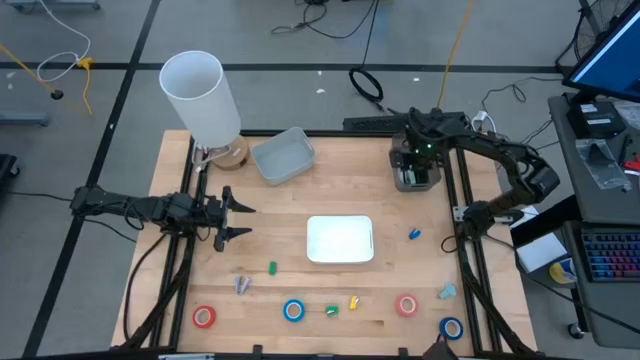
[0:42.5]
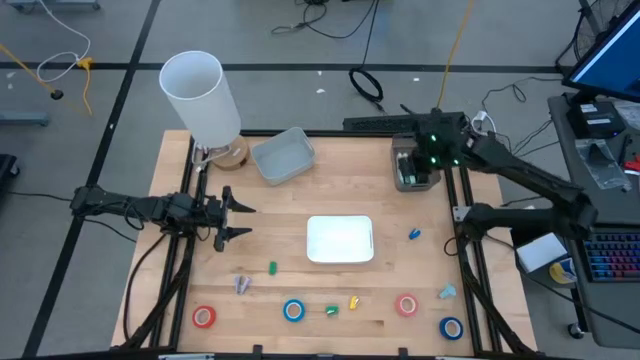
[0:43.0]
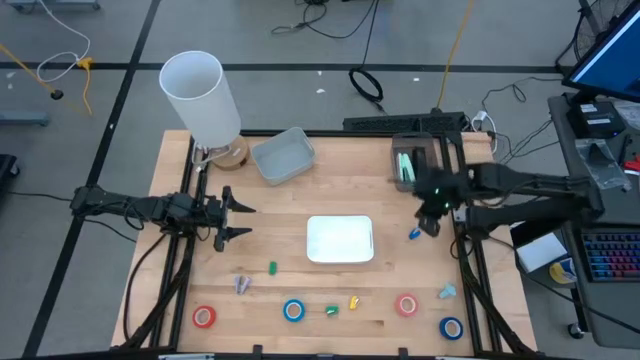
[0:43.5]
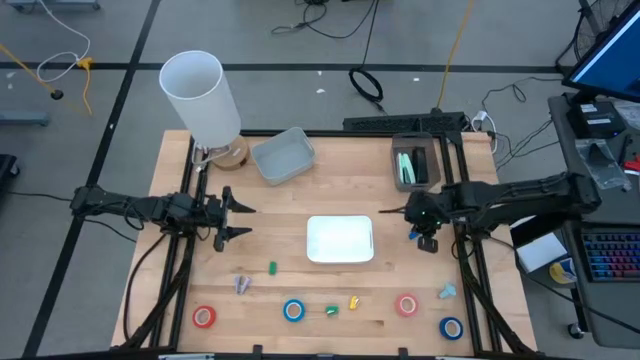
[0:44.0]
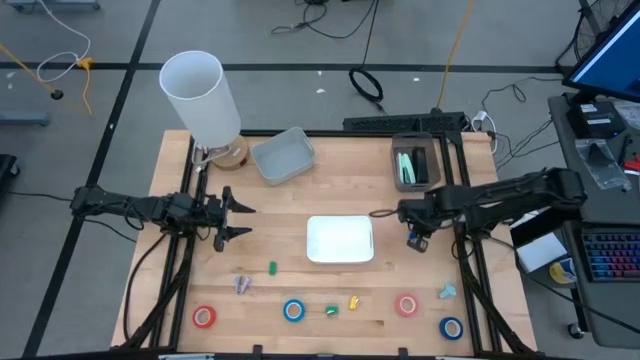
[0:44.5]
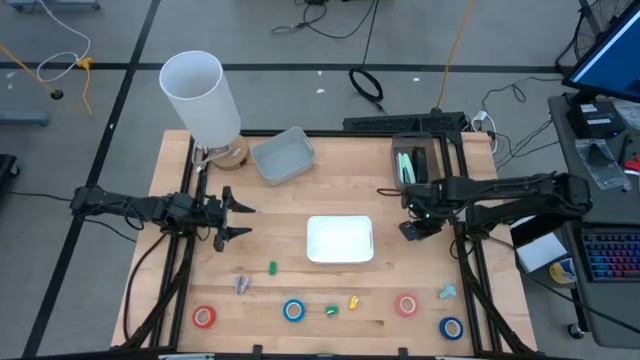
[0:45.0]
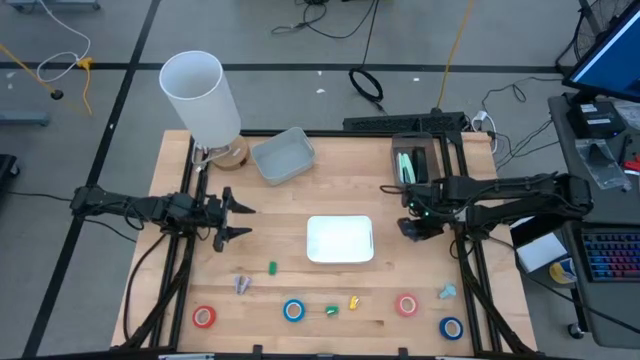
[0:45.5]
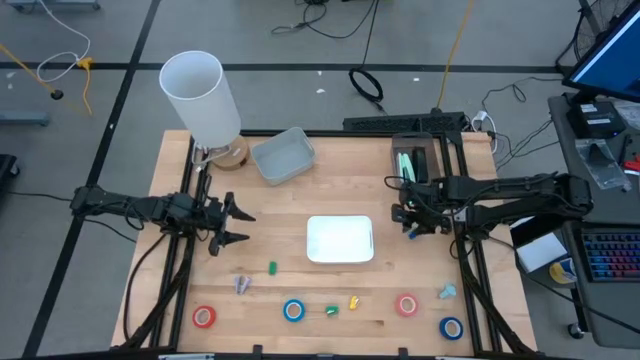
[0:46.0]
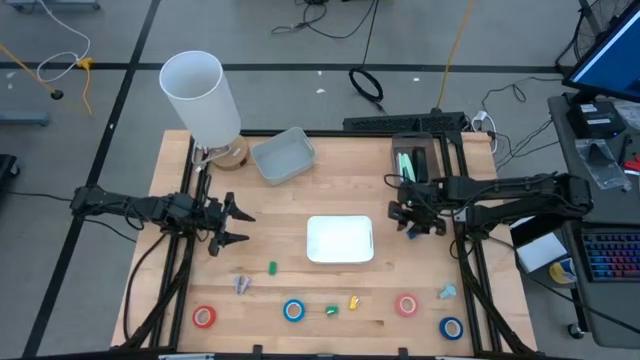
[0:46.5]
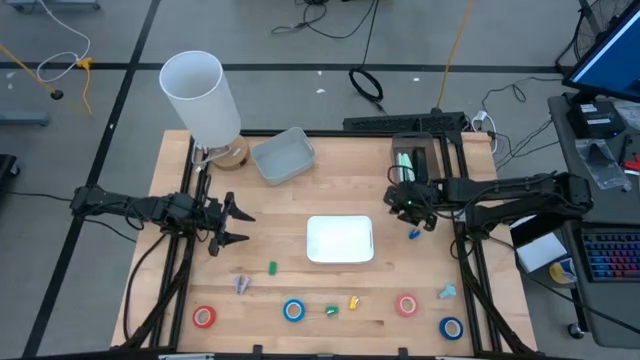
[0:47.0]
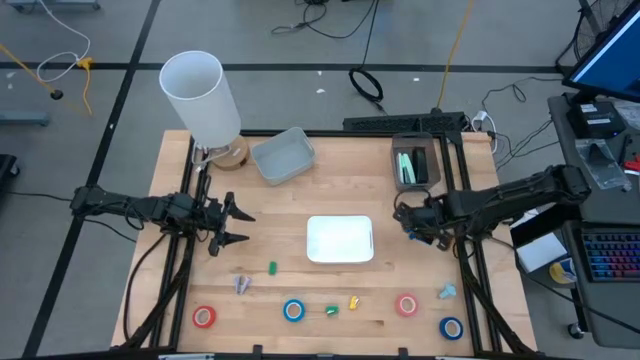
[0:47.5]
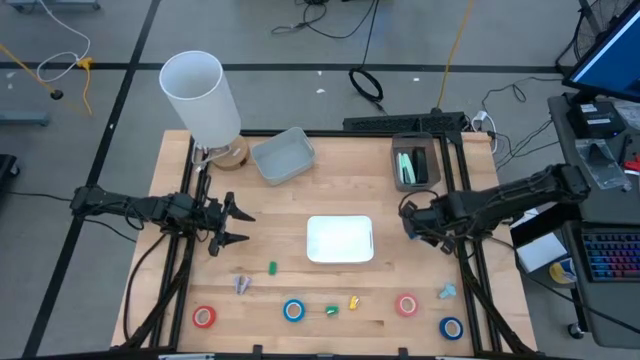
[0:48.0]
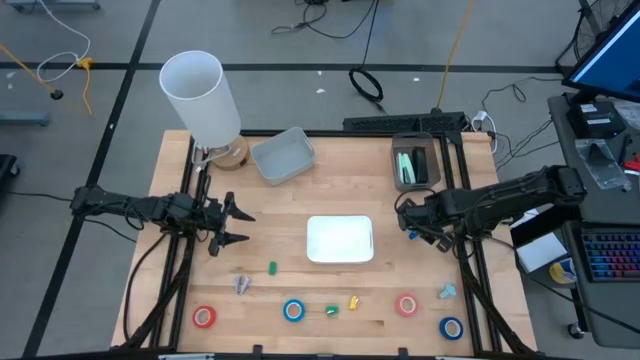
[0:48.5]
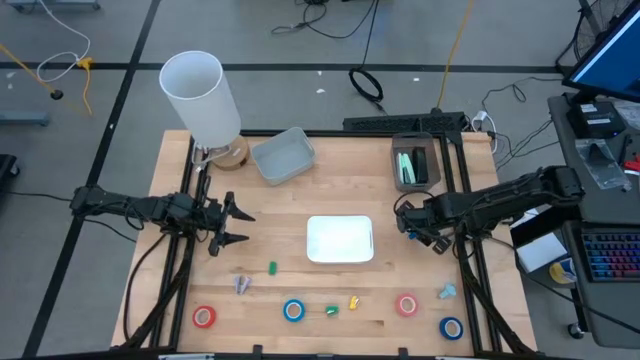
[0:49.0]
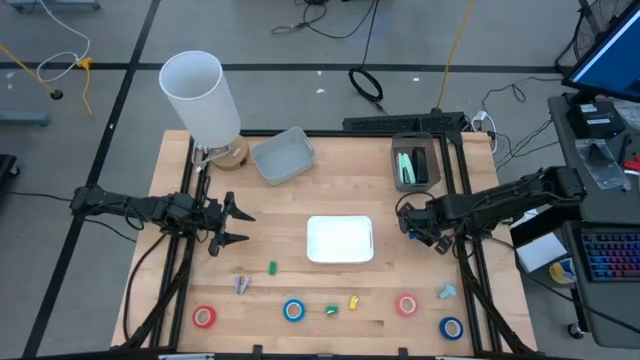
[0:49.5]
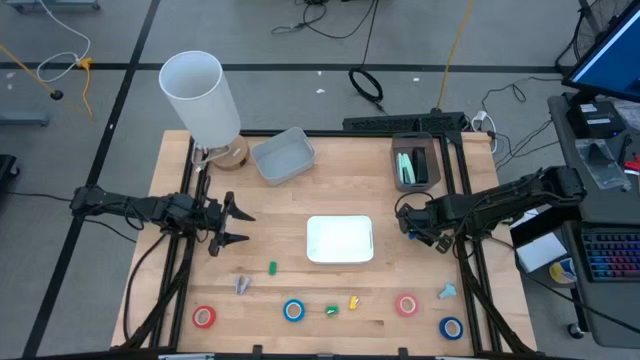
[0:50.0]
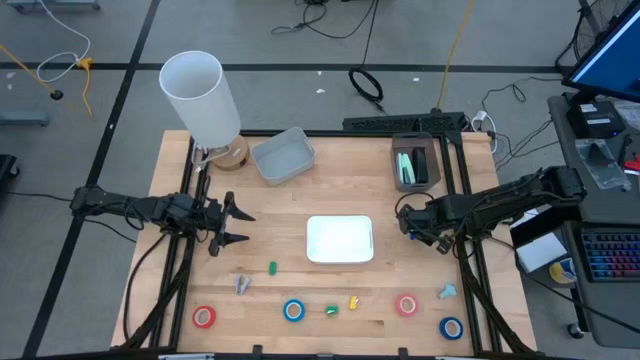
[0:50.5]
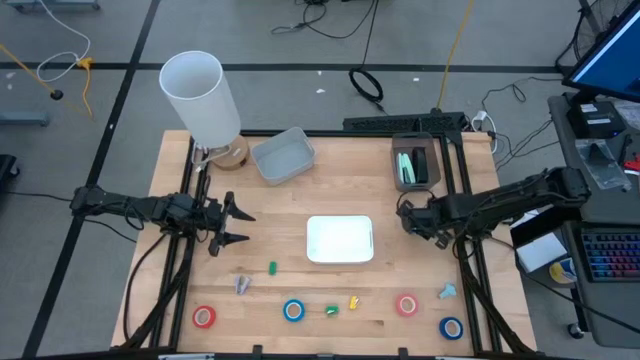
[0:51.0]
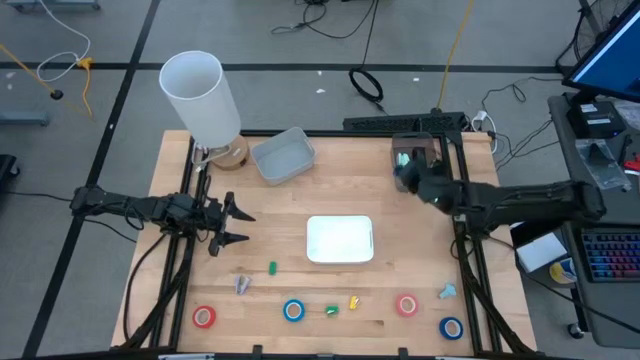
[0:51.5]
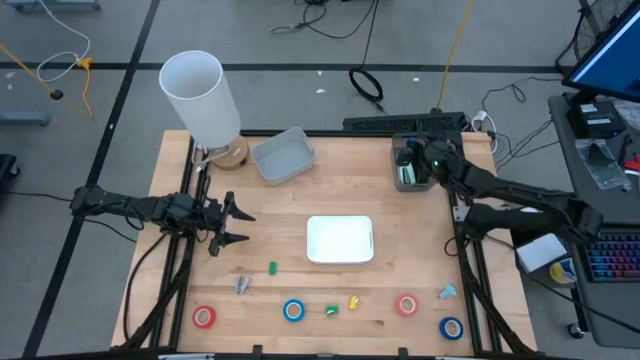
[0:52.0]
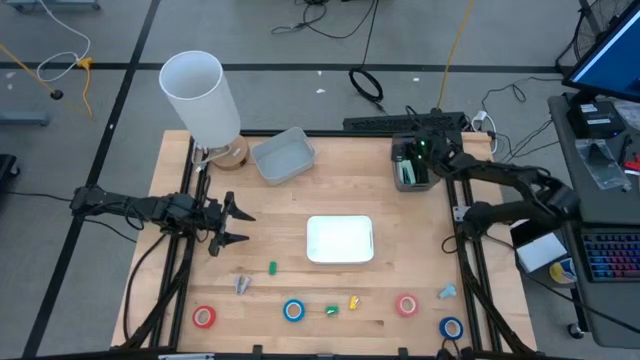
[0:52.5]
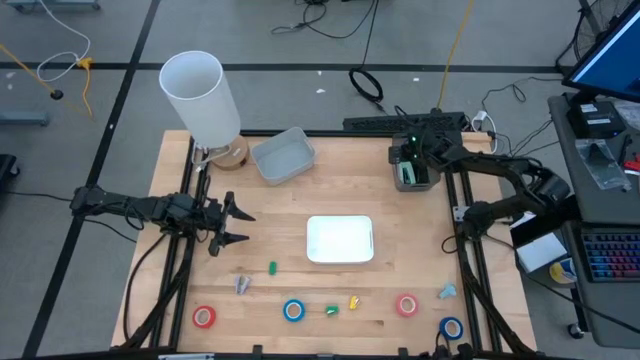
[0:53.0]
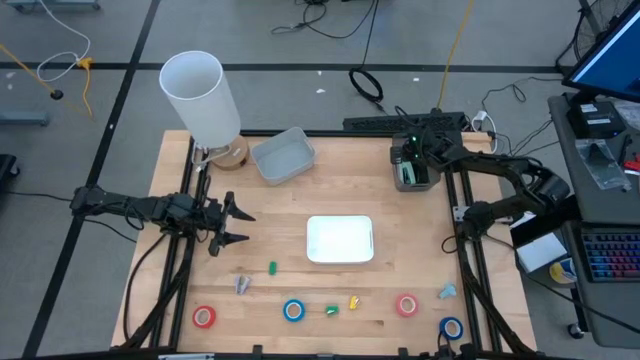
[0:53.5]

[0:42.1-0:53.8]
Task: Pick and place Stapler, Stapler remover, tape
Put the blue stapler into the black bin

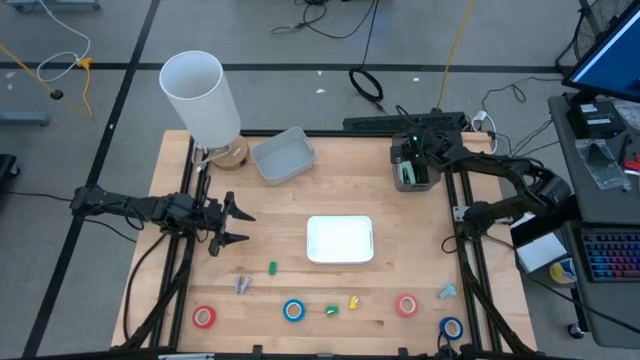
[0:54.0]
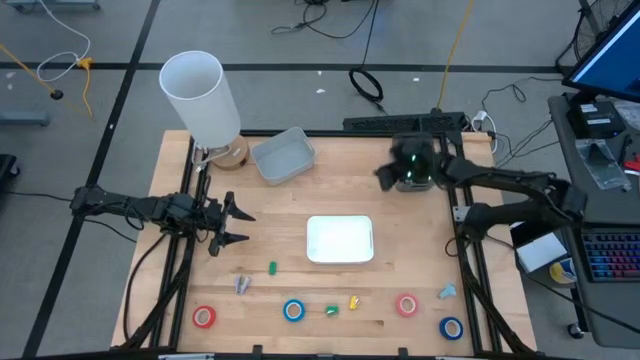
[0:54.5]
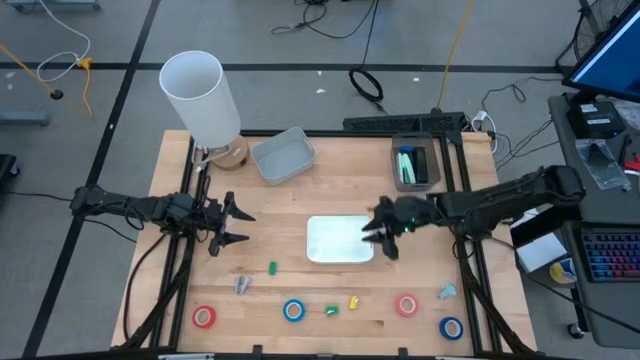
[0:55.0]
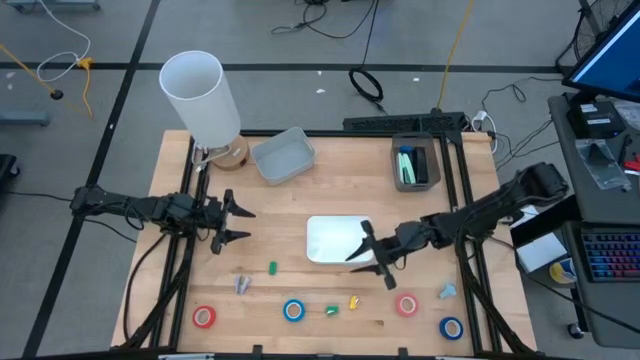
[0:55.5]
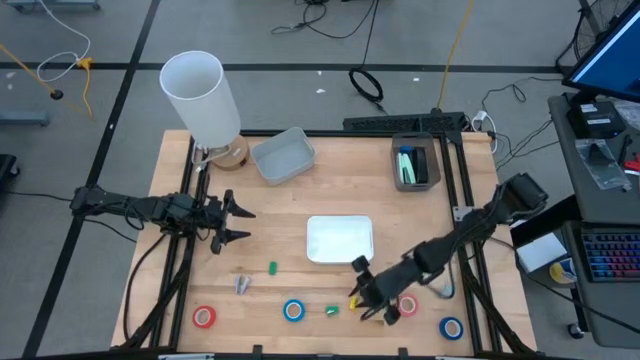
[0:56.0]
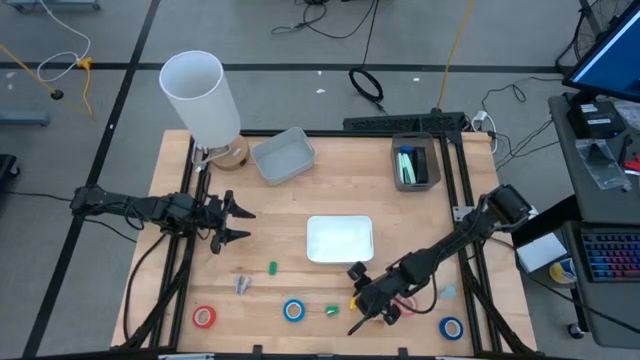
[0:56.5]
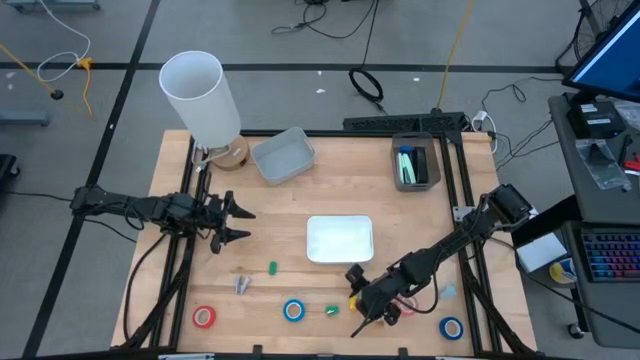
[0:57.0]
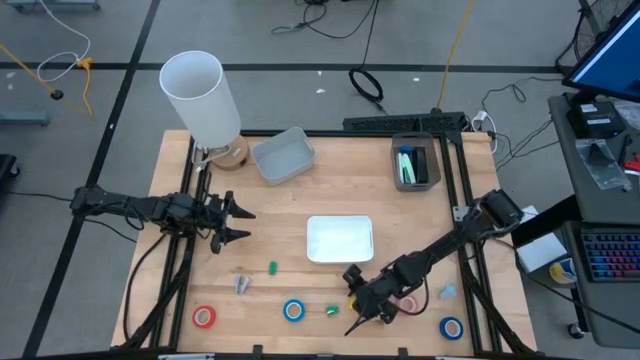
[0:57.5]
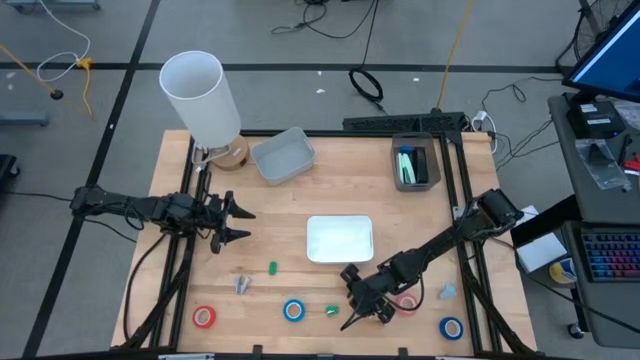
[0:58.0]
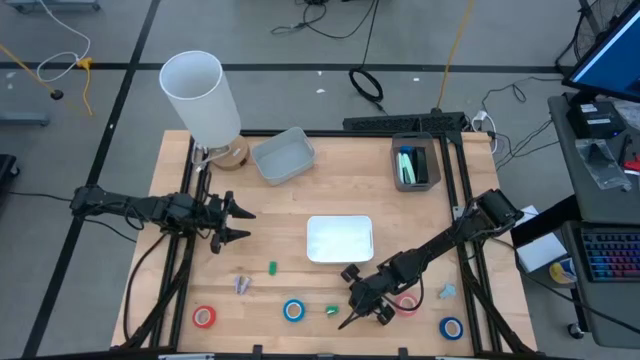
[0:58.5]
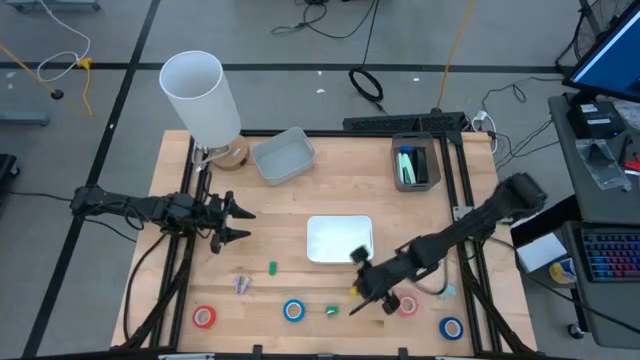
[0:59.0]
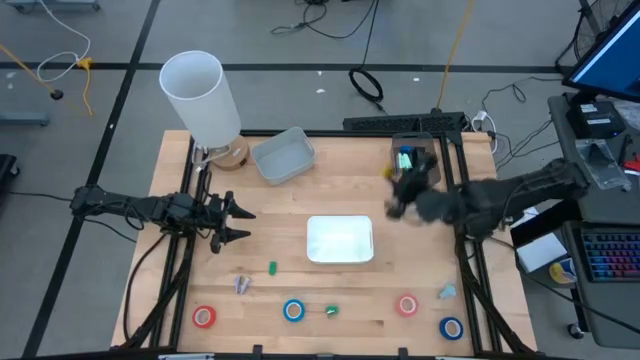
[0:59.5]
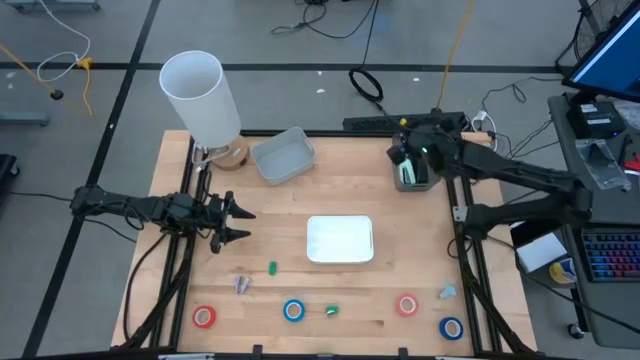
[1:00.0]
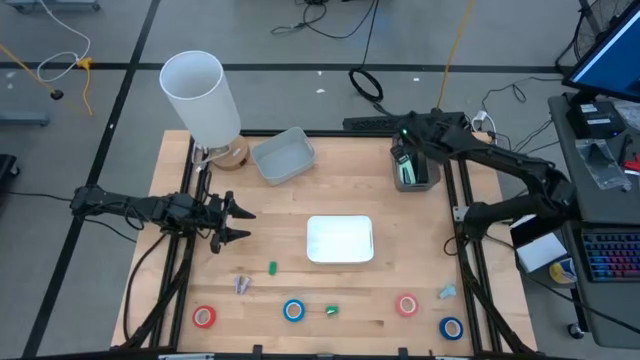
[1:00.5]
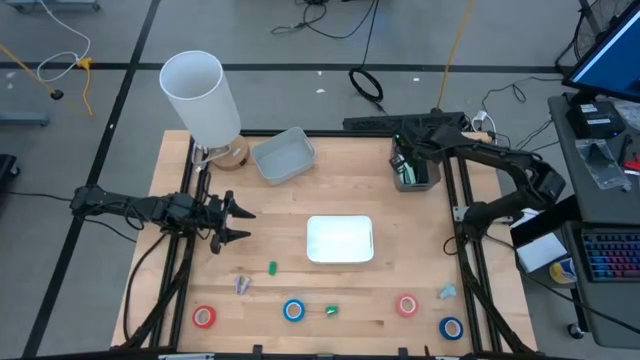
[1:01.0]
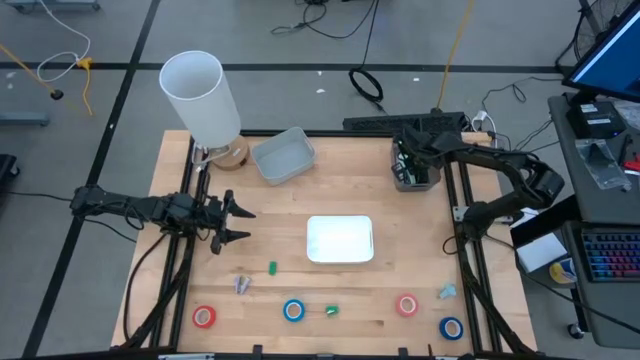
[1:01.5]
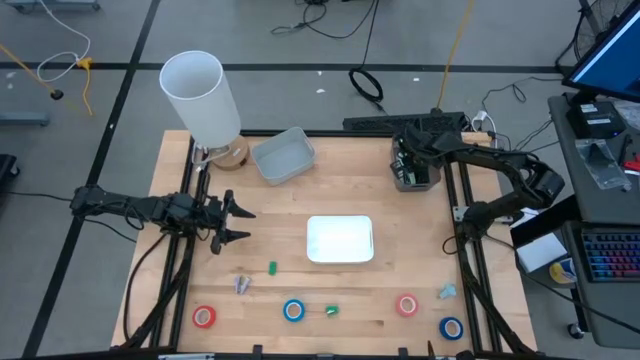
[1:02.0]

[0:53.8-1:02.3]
Put the yellow stapler into the black bin
